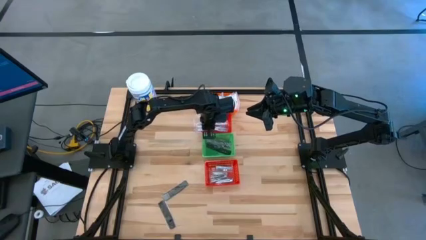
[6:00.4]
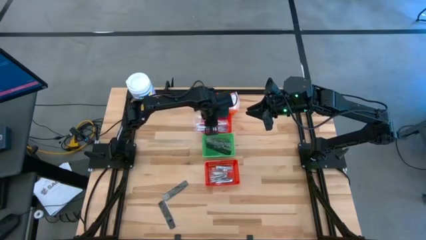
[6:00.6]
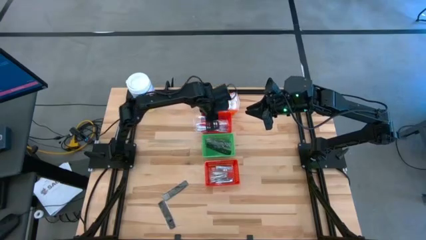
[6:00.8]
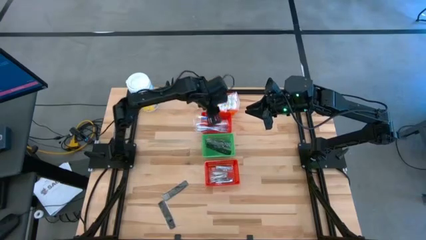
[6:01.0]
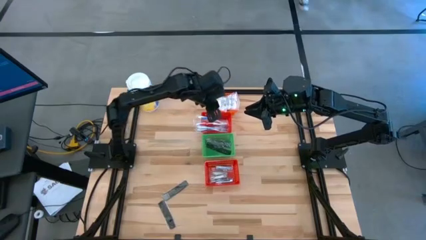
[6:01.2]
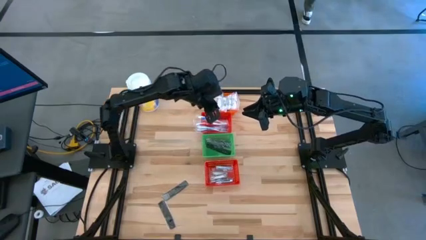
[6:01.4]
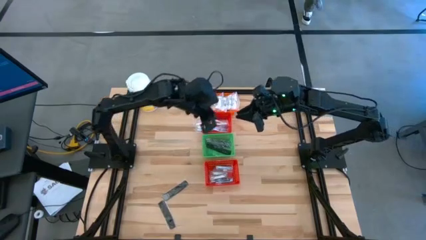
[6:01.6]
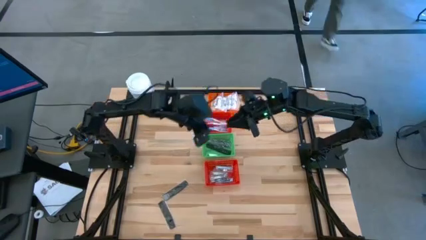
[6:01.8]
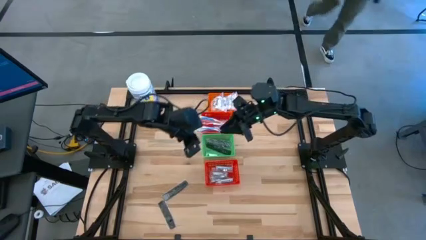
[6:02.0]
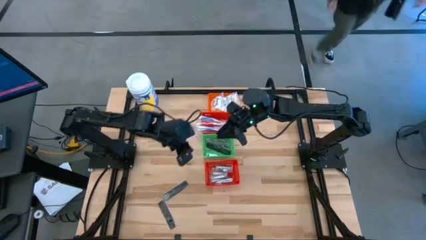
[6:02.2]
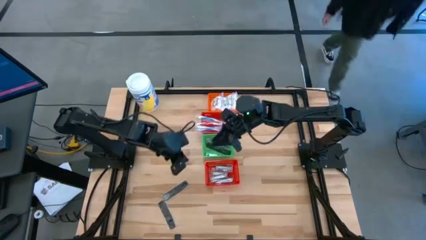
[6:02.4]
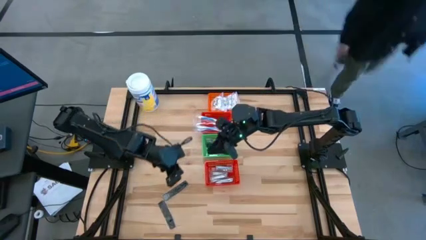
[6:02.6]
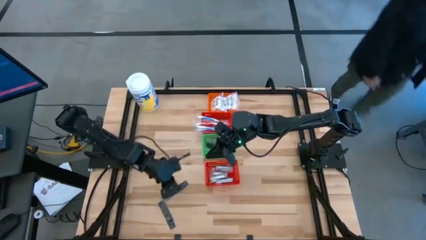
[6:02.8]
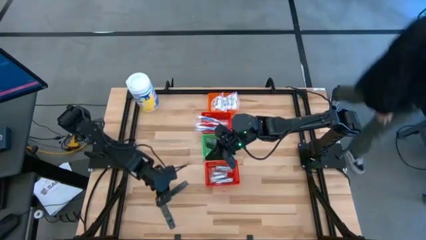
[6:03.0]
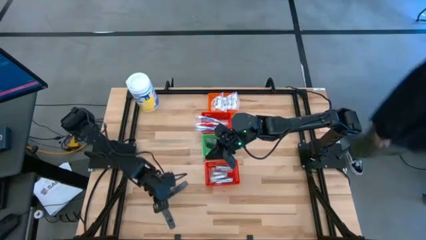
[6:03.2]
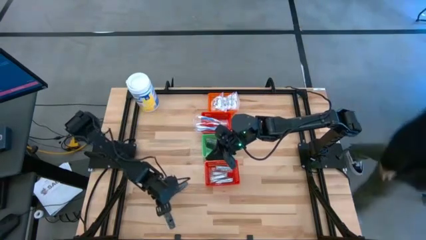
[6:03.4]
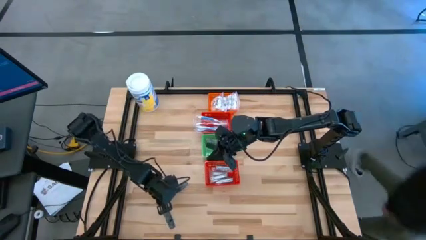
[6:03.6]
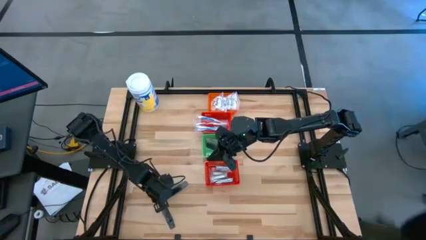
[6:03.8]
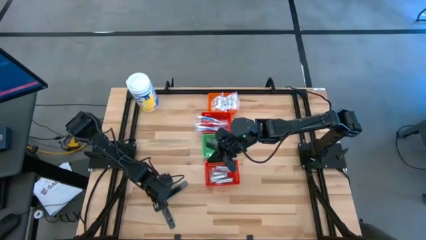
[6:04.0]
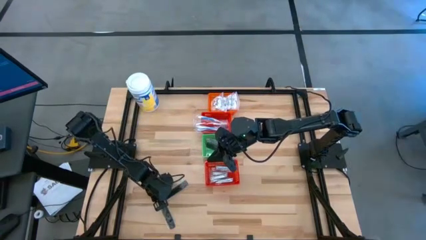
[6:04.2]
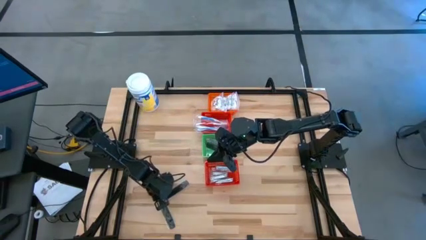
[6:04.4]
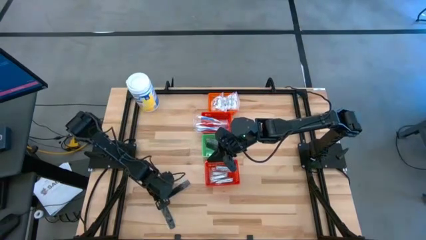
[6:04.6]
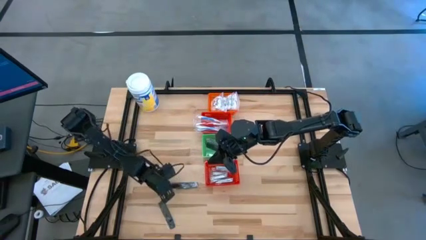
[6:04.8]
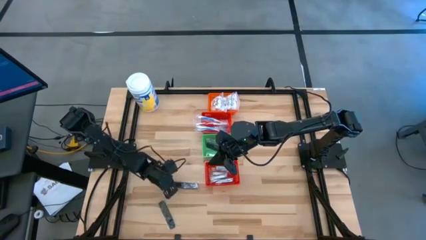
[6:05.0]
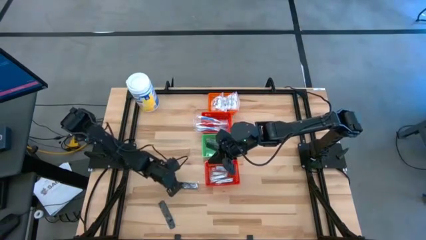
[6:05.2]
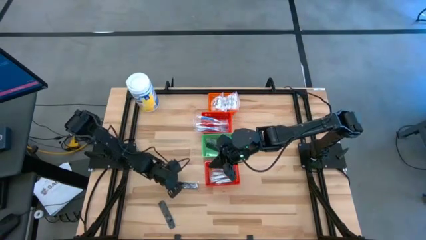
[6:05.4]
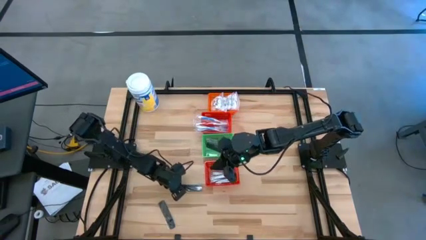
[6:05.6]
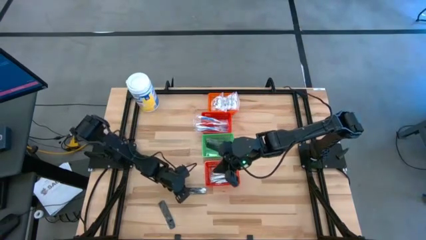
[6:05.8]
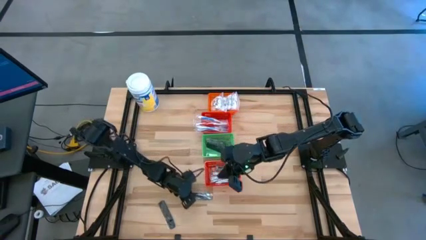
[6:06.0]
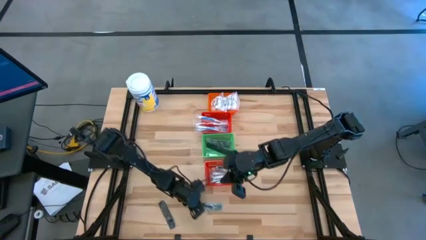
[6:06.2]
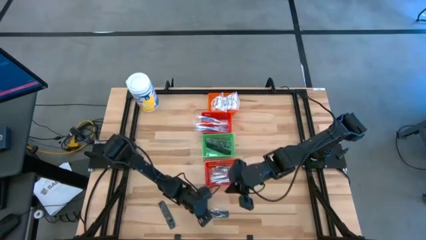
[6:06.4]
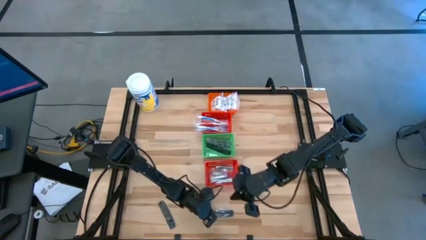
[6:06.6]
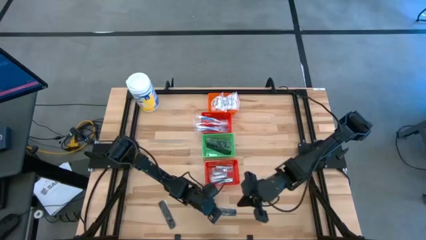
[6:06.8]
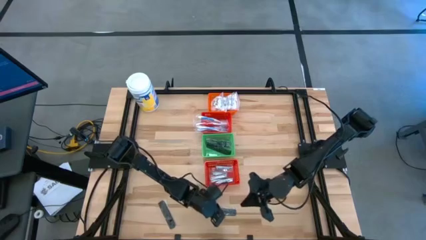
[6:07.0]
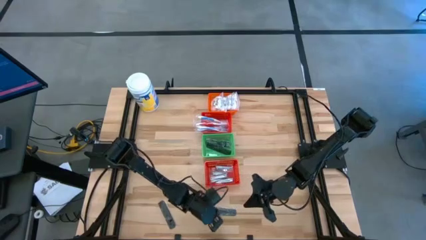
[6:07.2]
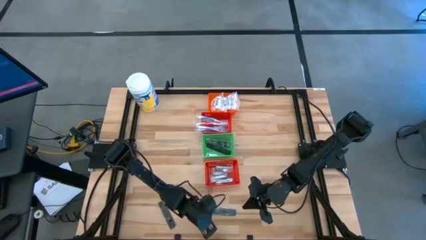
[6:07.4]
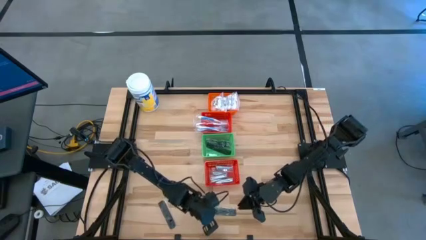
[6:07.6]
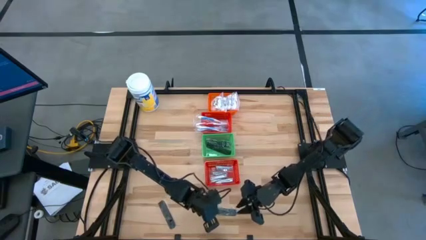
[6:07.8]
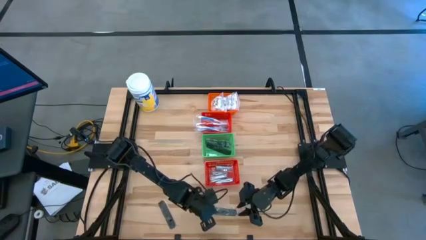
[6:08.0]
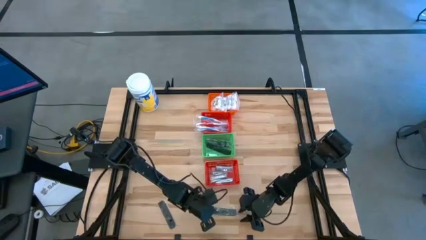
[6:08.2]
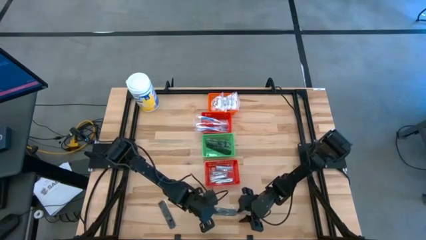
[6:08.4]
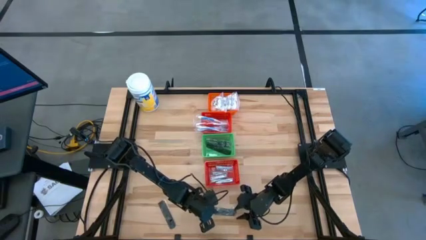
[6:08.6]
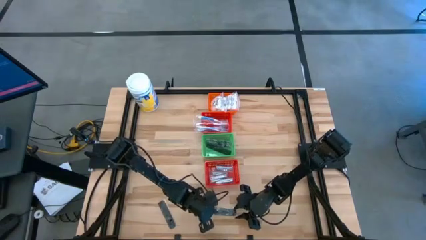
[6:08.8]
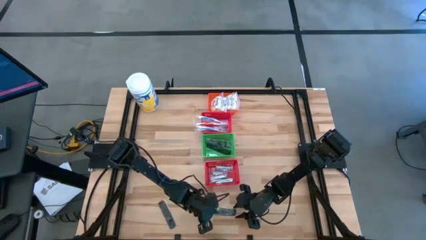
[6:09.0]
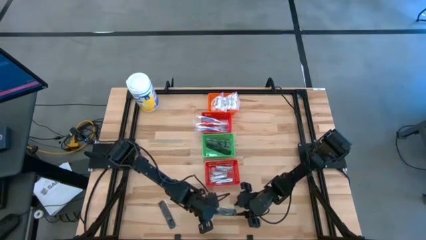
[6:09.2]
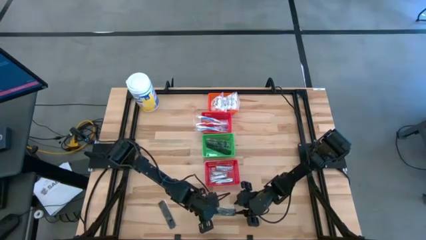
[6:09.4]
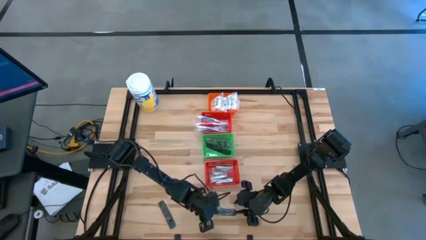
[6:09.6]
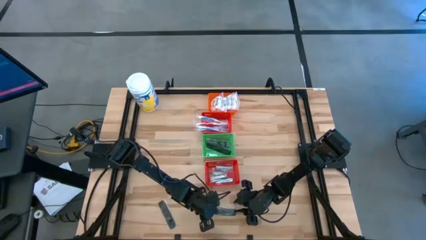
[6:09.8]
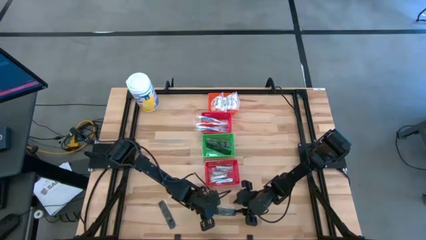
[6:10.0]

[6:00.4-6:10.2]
Task: Pick & Place Travel size toiletries
Put the black comb into the green basket

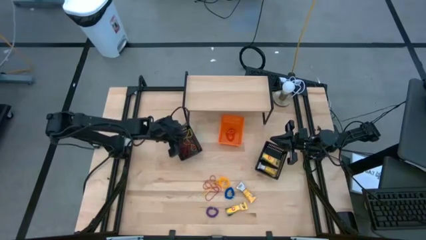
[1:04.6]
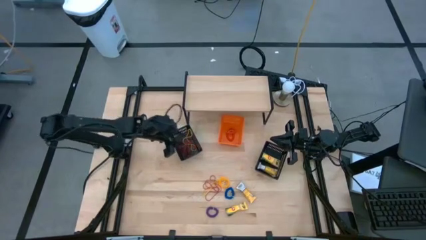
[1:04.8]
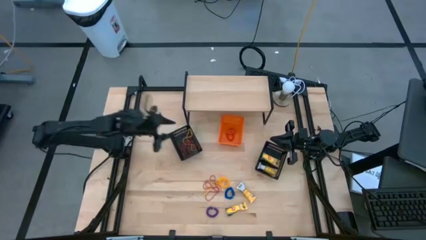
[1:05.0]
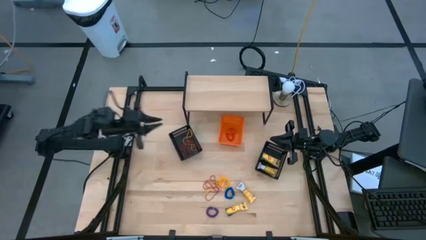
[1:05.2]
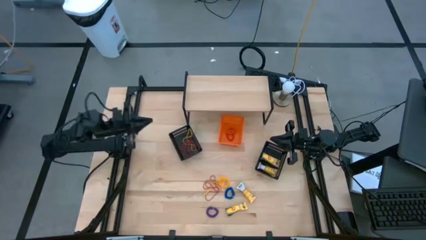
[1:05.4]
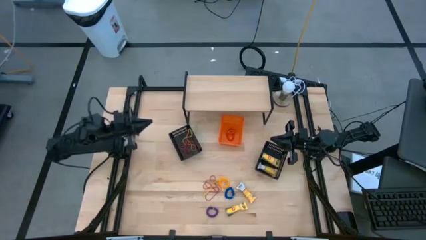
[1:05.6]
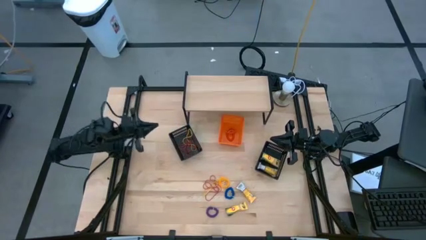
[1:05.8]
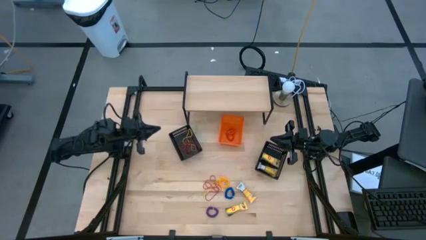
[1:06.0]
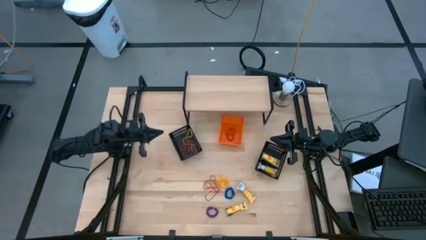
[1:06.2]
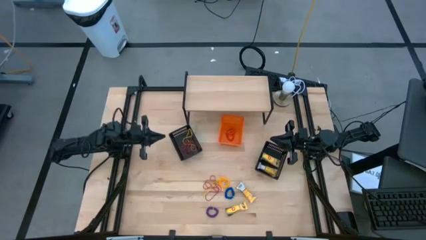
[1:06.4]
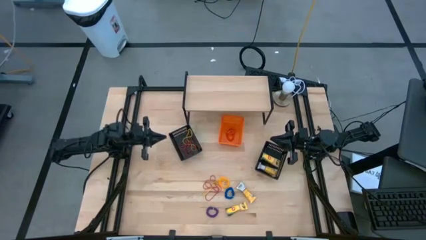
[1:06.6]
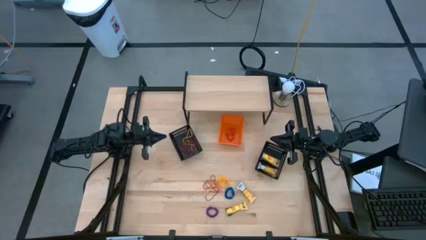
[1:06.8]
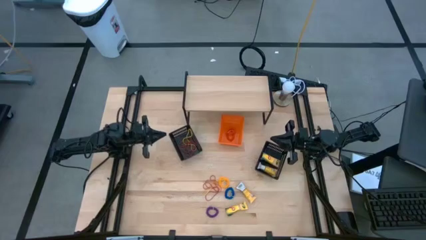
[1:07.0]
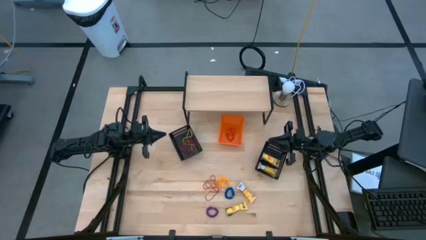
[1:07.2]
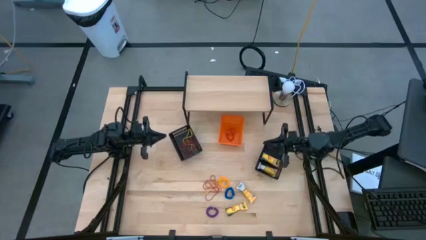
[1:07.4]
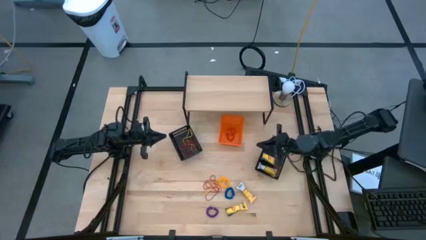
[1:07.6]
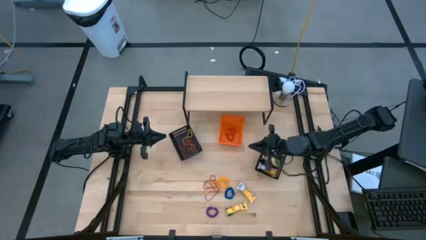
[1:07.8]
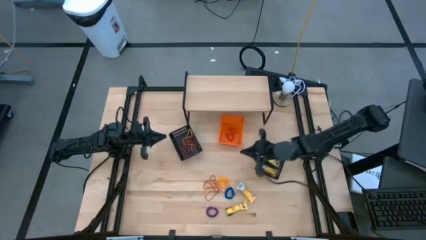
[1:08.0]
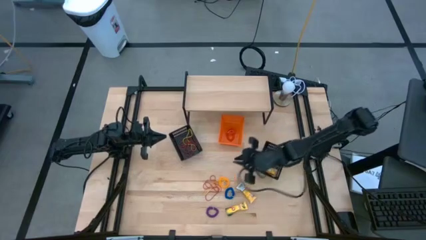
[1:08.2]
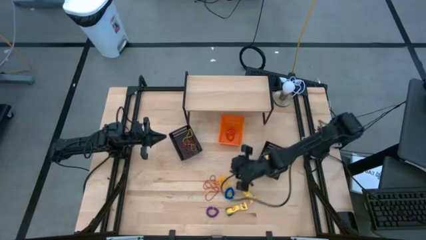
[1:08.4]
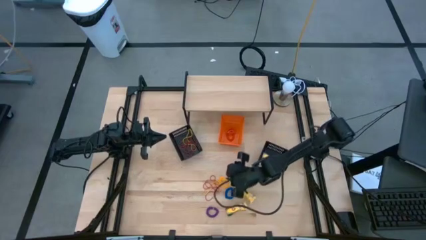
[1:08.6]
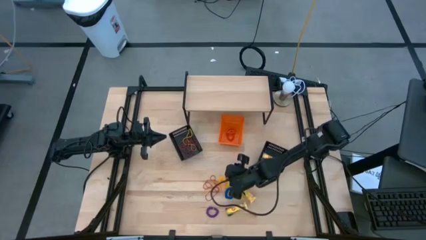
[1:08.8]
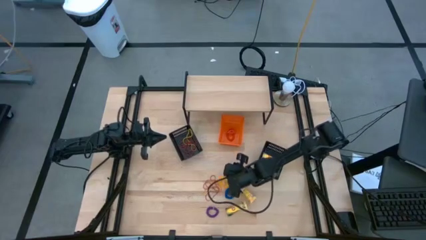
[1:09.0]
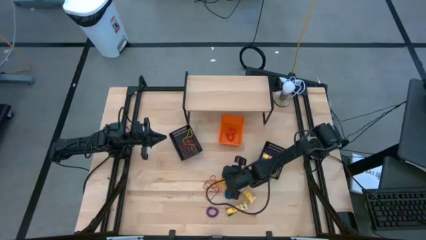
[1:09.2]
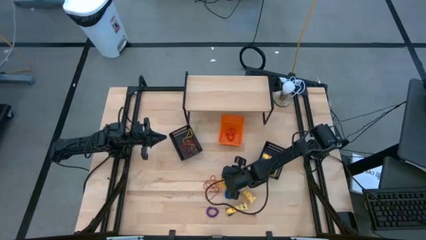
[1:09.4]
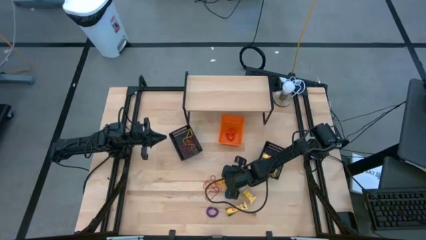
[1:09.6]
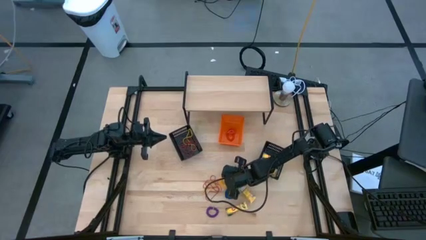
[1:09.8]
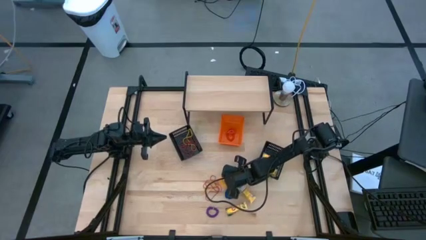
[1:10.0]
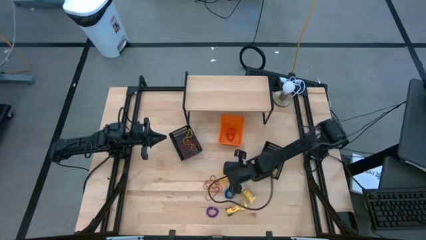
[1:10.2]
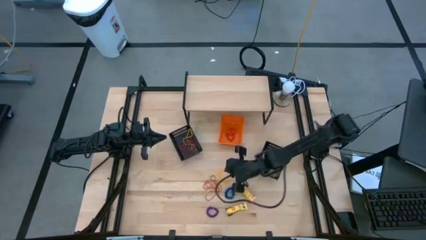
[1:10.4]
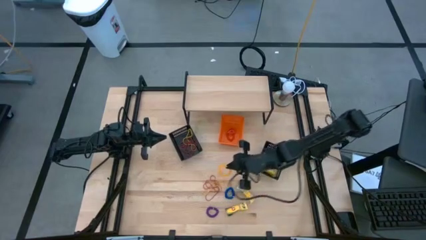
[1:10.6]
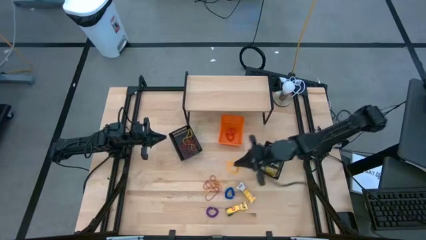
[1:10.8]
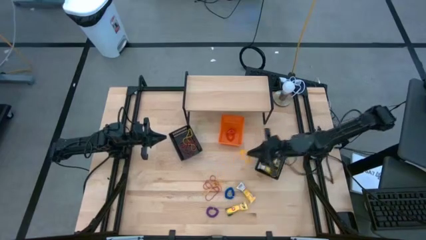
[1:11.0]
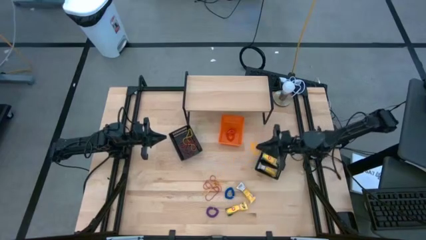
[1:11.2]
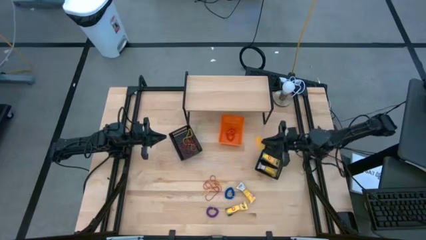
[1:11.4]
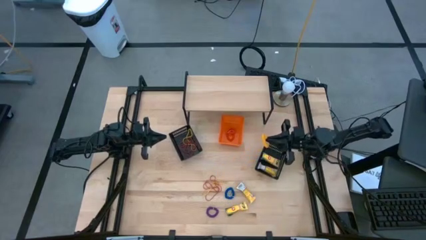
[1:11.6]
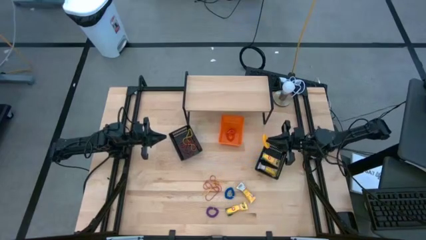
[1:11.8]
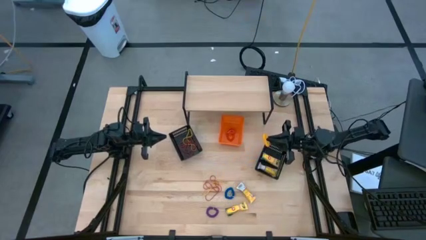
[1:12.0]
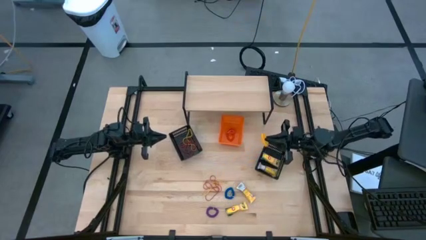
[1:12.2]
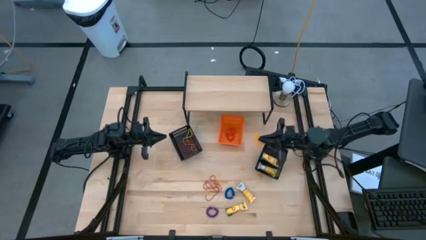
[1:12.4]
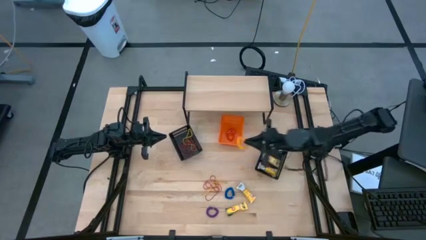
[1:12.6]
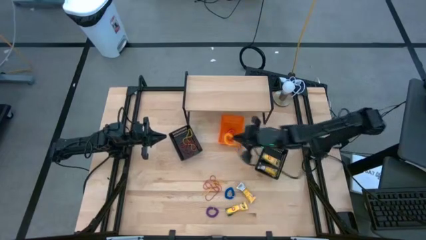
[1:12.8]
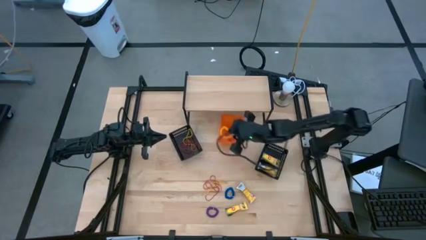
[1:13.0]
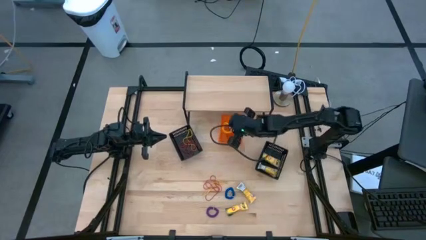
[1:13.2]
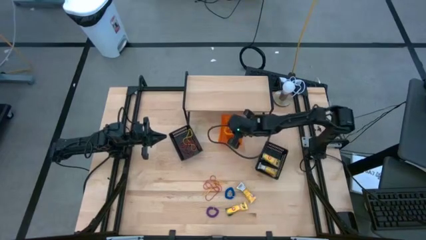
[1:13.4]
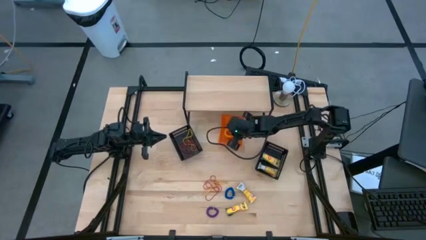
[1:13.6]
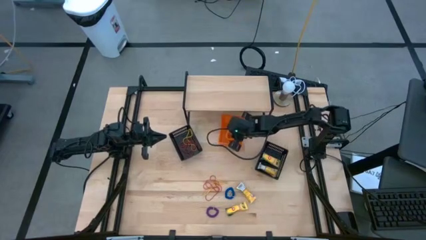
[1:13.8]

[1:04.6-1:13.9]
Task: Pick & Place Office Desk Supplies
Put the yellow spring keychain into the orange bin
